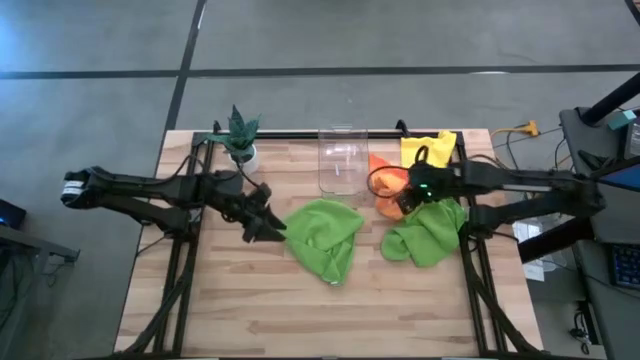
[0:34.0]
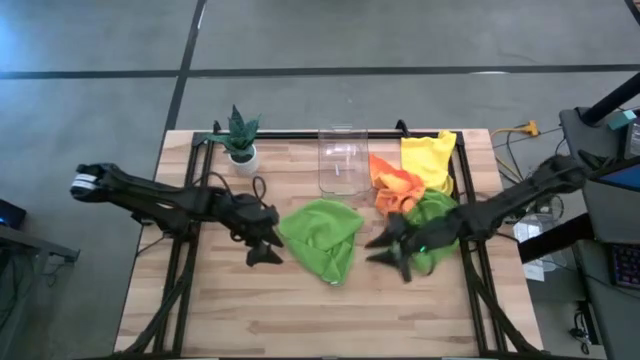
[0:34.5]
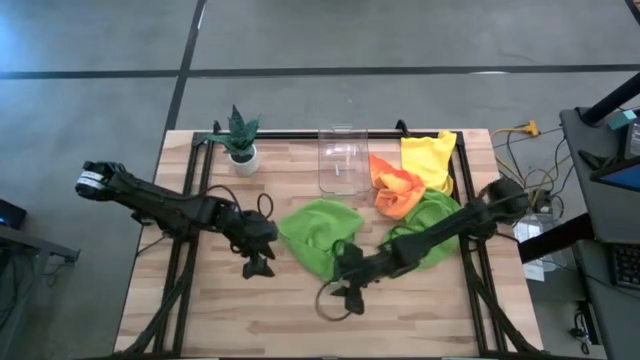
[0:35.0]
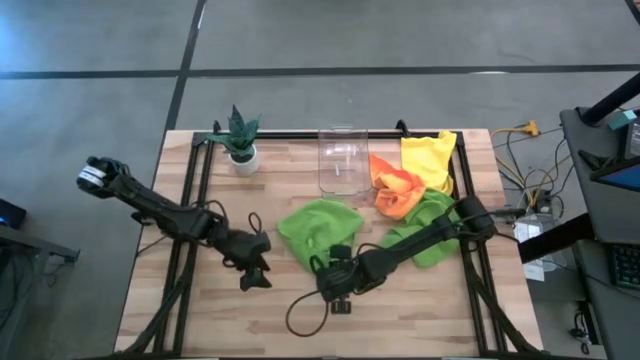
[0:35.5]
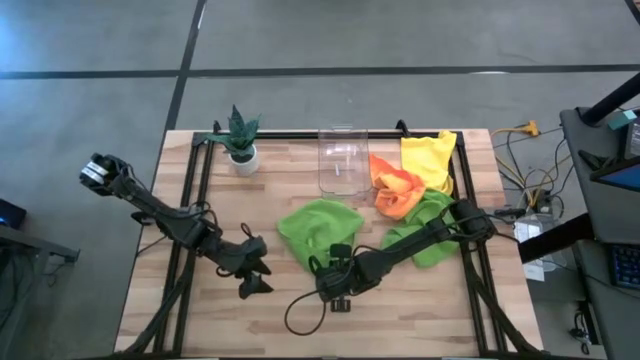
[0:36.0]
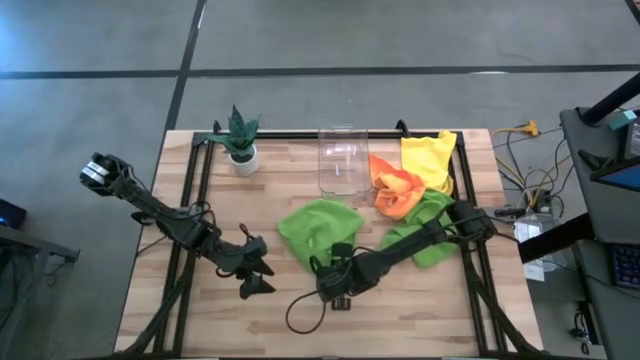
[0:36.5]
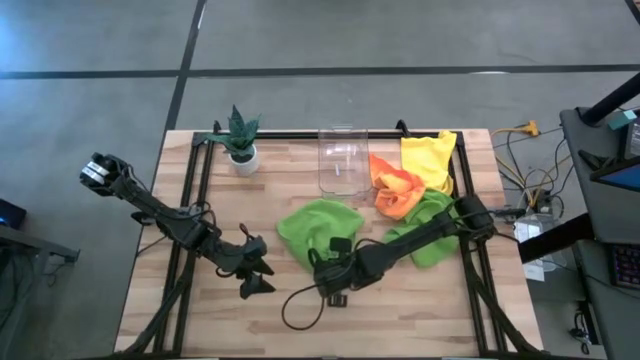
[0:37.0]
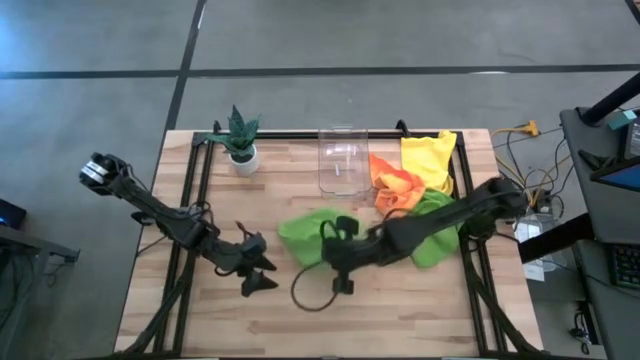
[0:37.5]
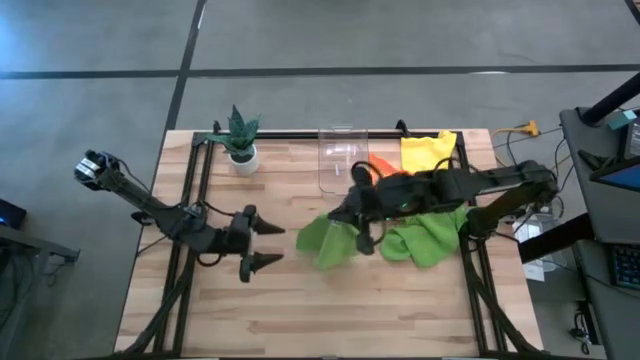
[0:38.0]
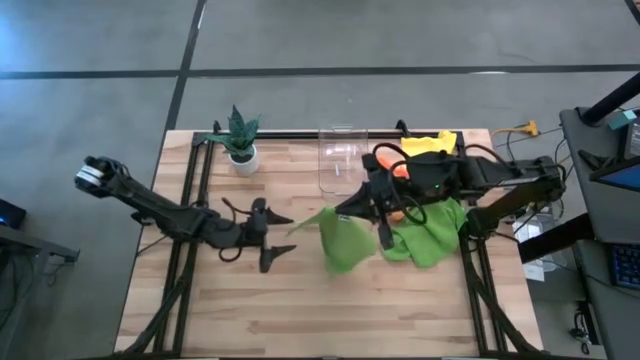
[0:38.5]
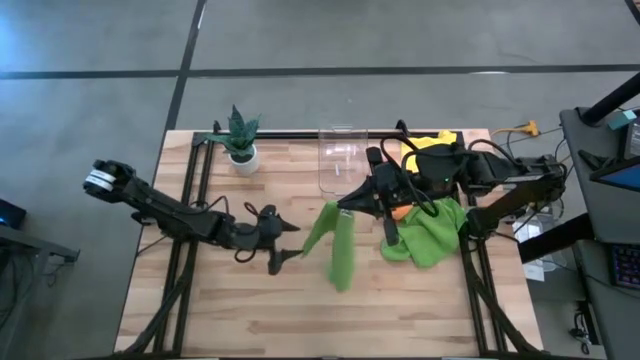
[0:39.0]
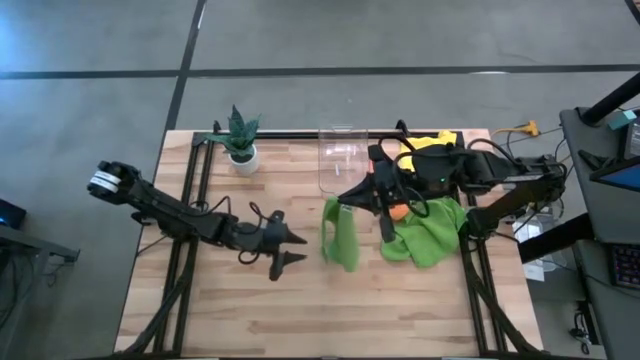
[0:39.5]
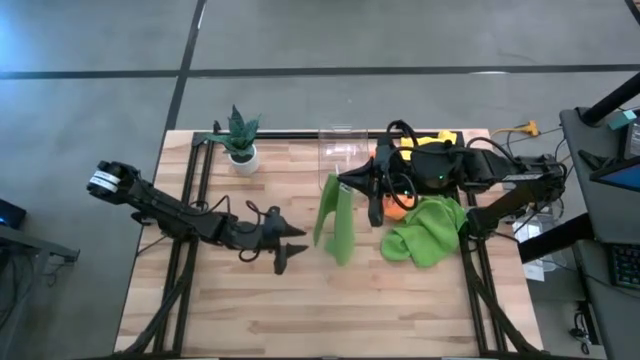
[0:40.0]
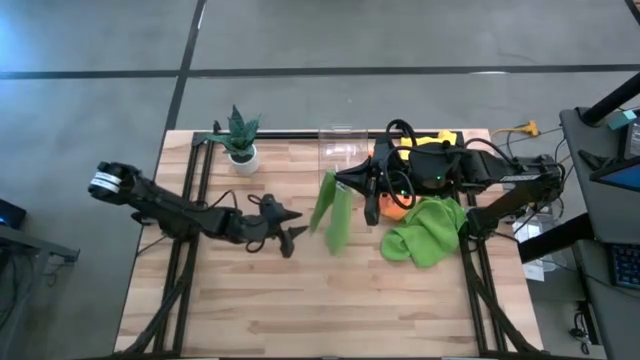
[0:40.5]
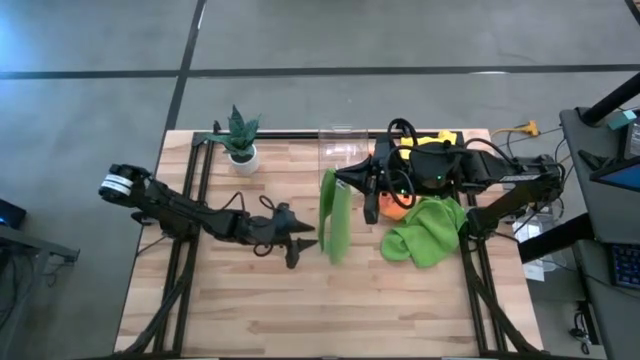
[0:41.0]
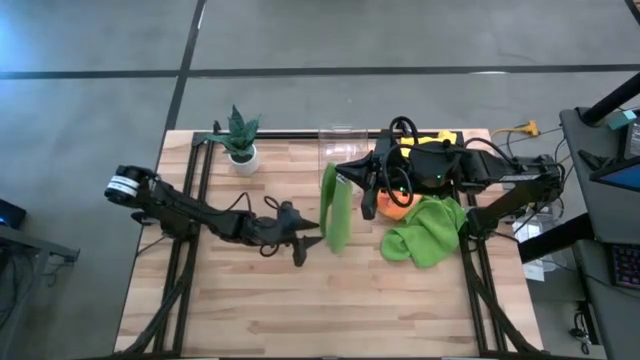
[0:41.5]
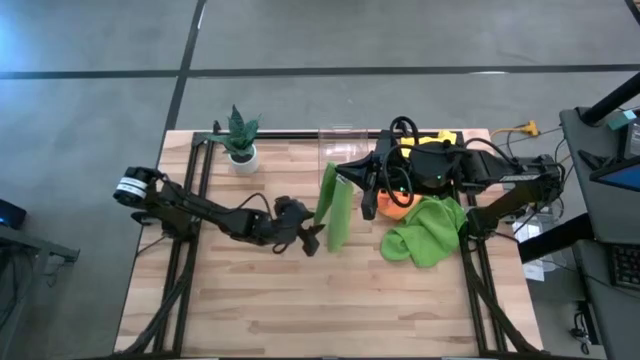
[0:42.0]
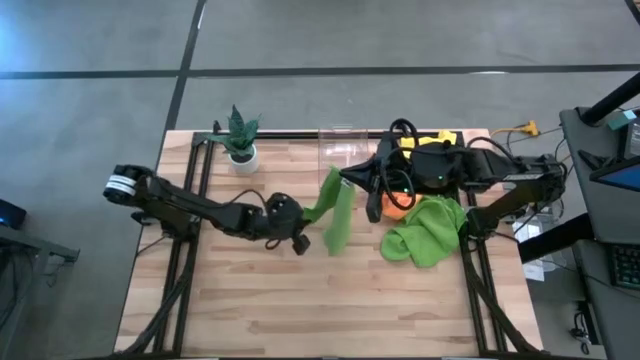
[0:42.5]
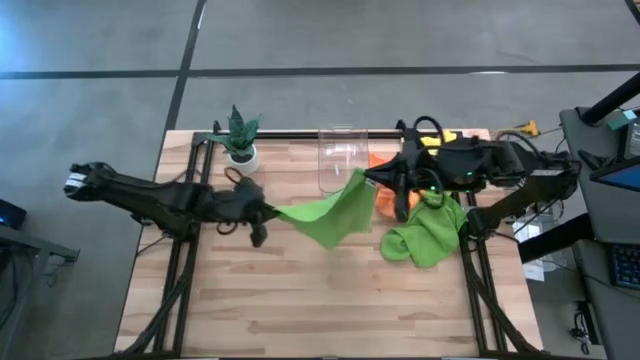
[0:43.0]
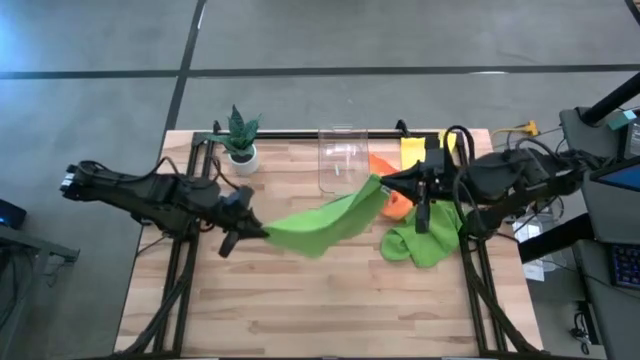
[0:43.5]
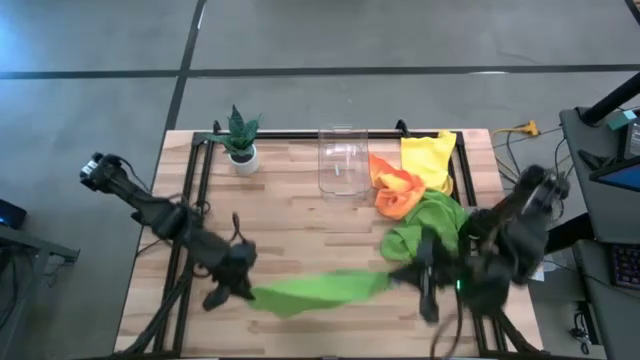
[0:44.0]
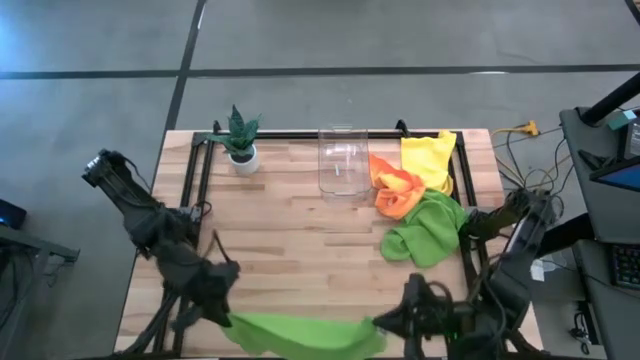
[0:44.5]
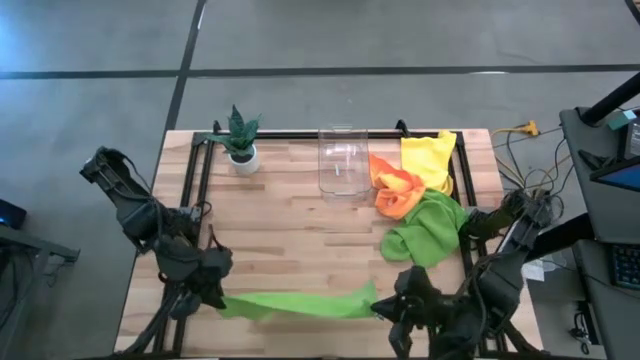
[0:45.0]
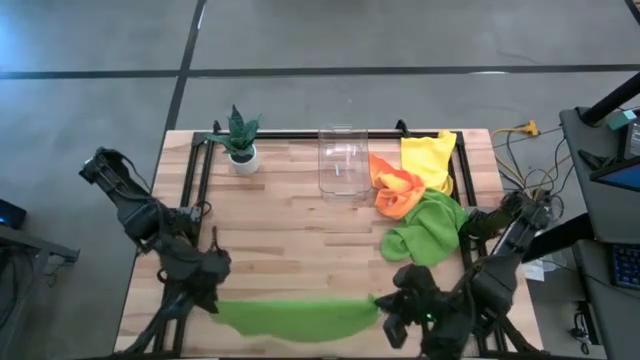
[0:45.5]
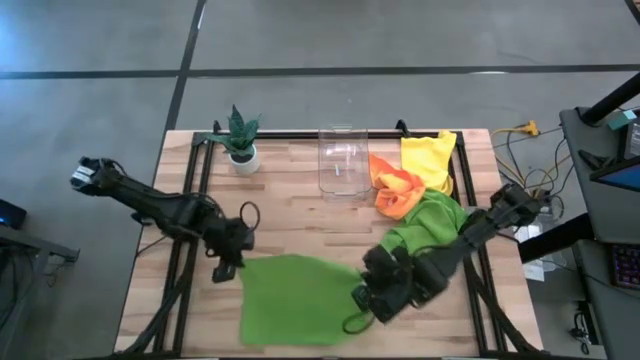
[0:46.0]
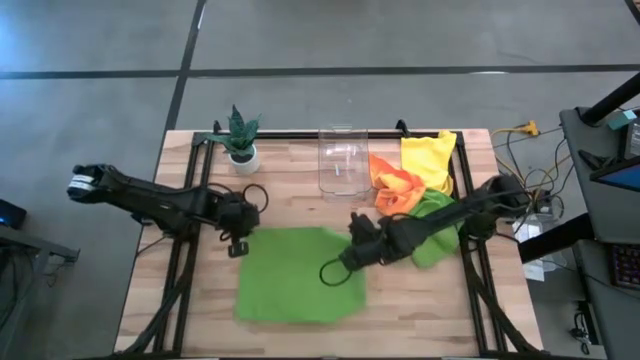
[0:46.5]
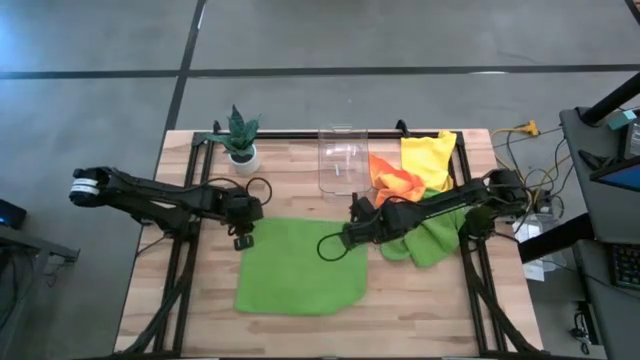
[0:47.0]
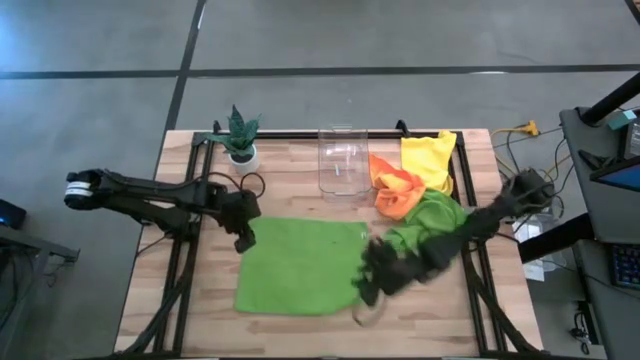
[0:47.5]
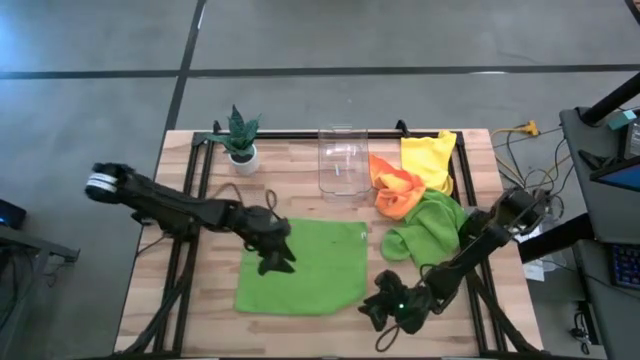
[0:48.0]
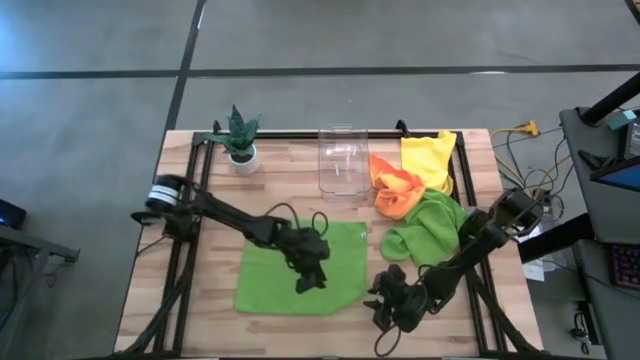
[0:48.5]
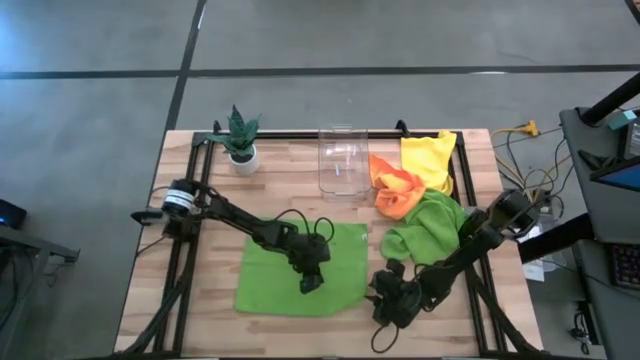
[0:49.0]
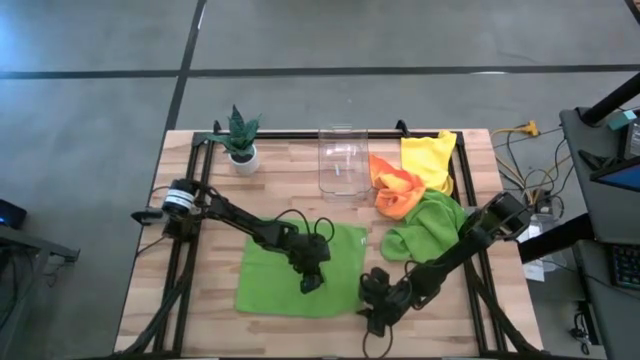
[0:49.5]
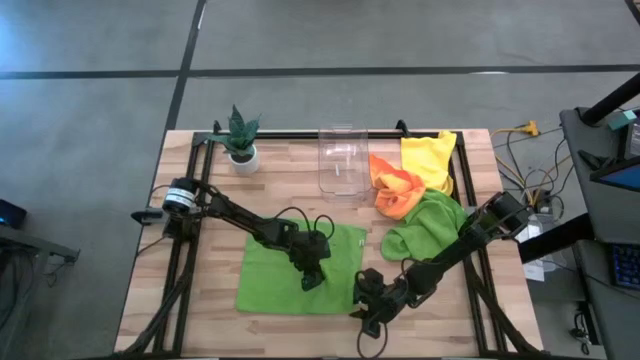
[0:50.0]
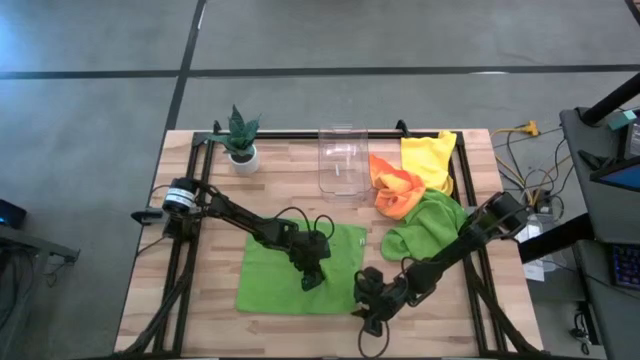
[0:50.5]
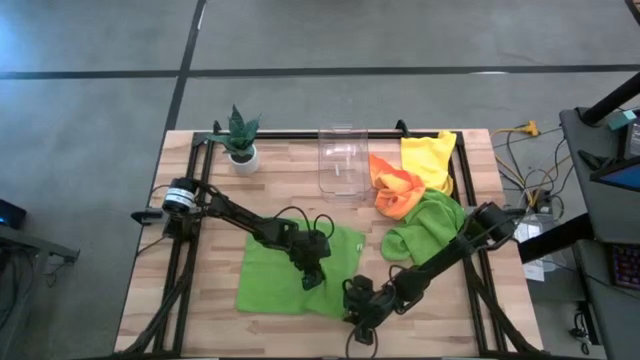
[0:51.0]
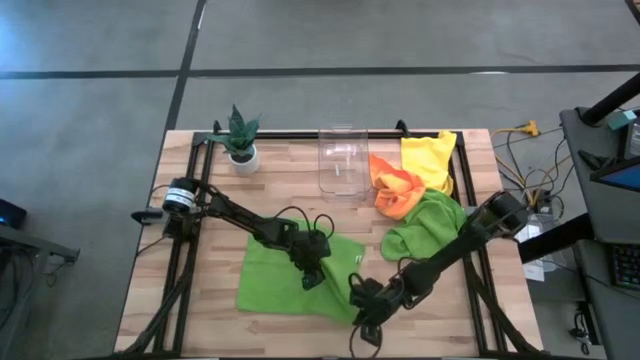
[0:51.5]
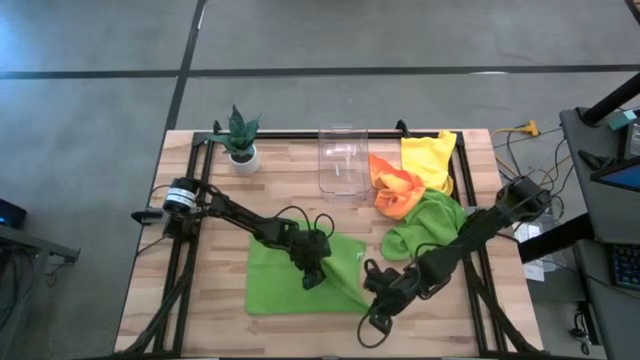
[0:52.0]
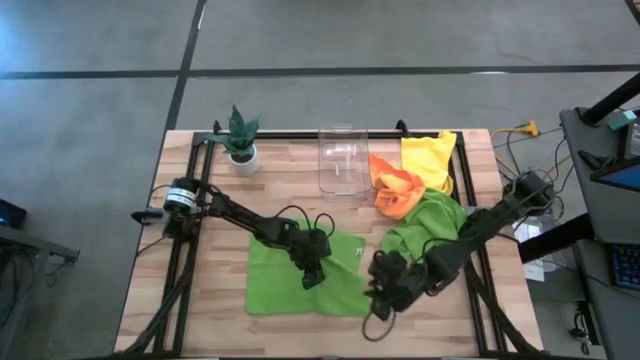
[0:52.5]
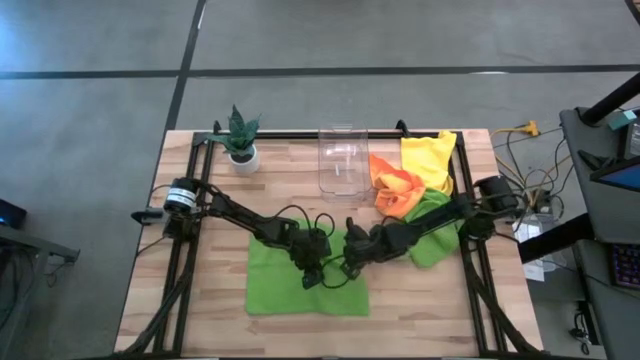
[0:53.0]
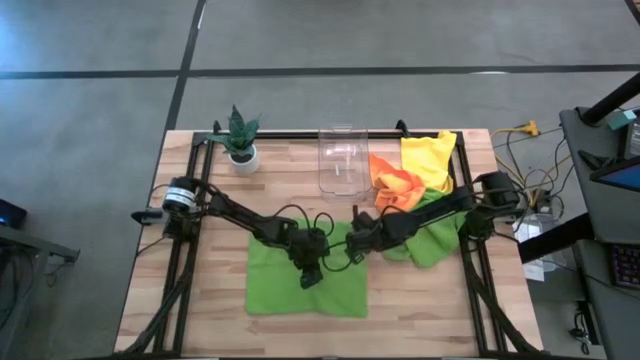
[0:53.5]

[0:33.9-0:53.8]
Task: Fold microfiber towels
Fold the top green towel
